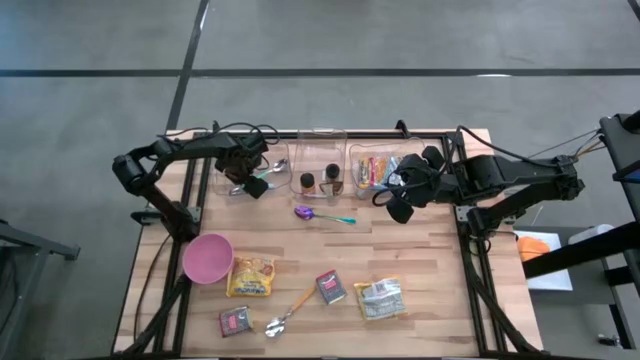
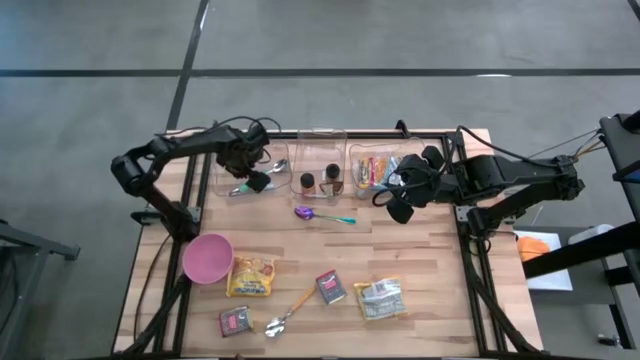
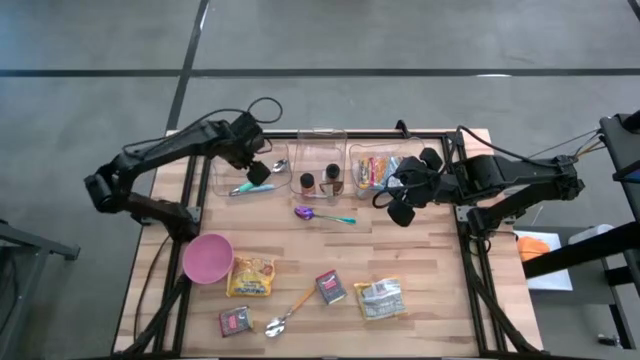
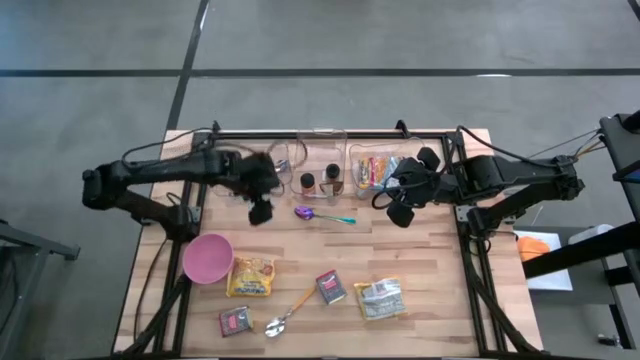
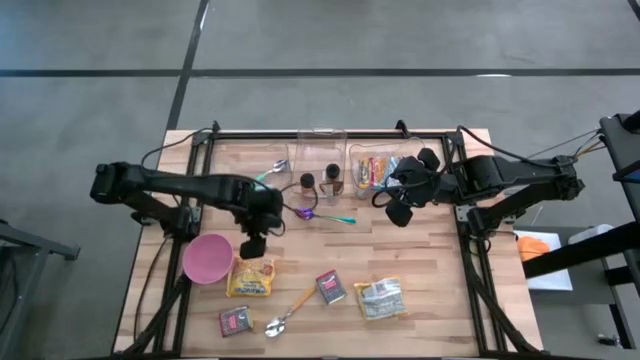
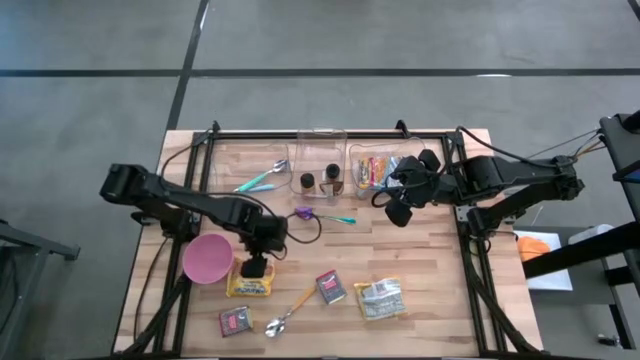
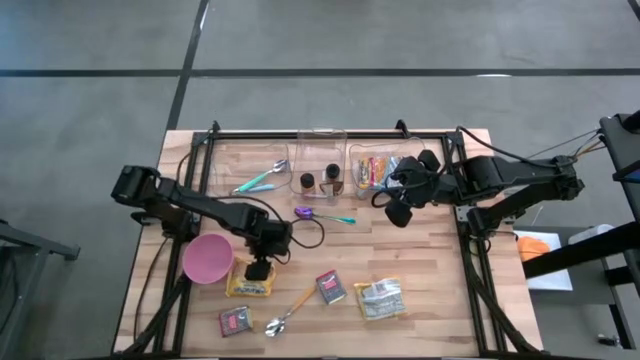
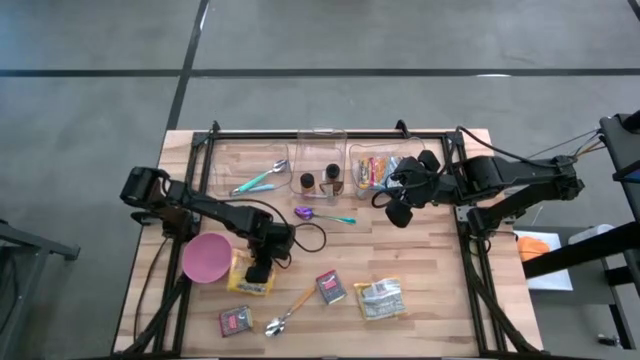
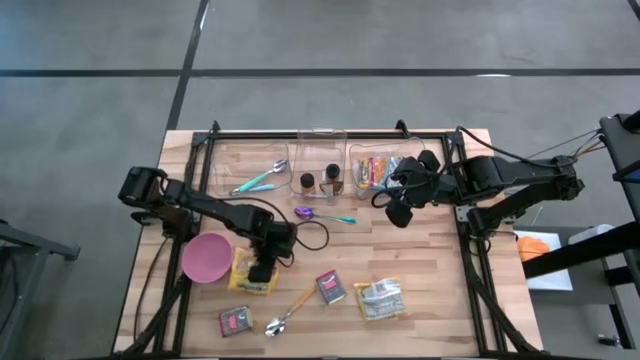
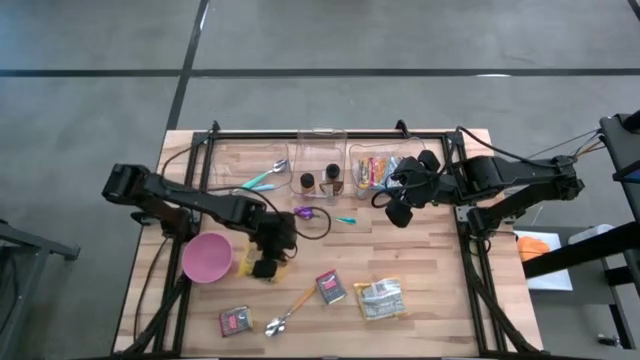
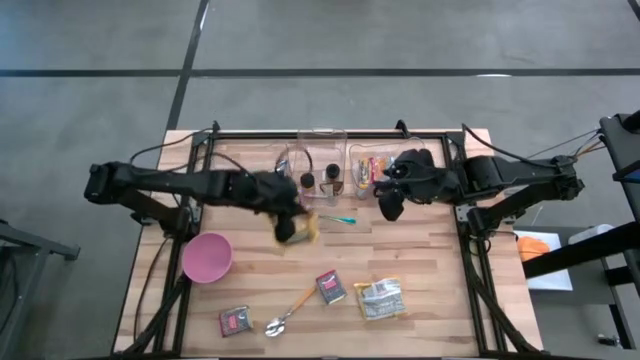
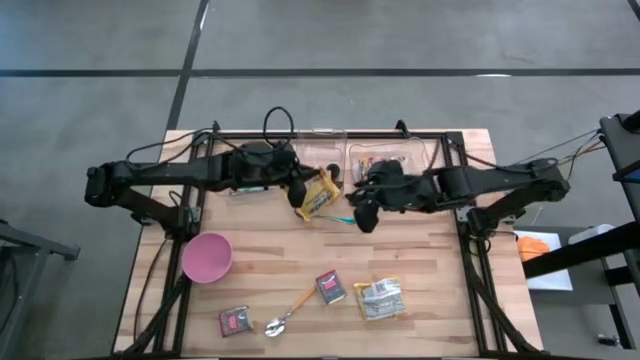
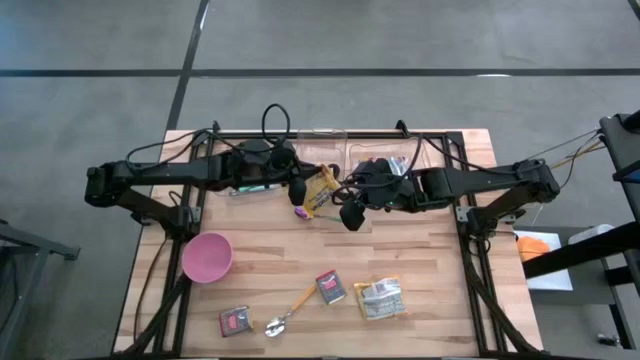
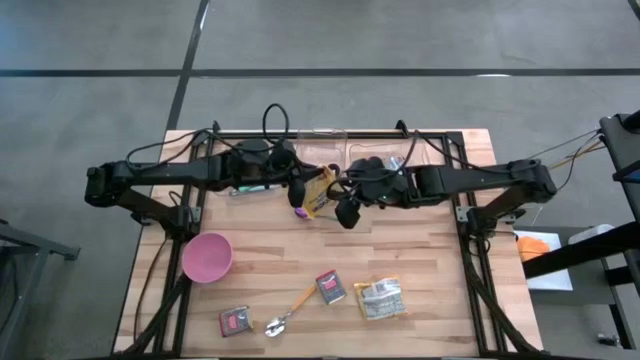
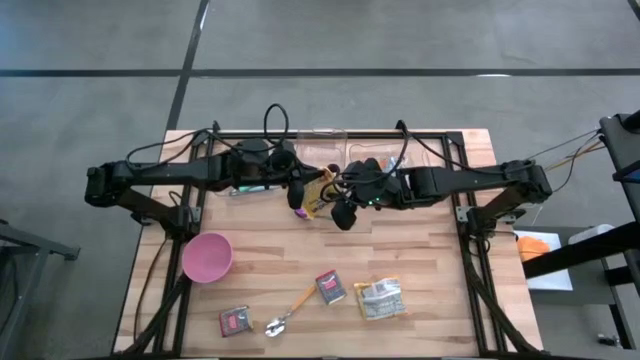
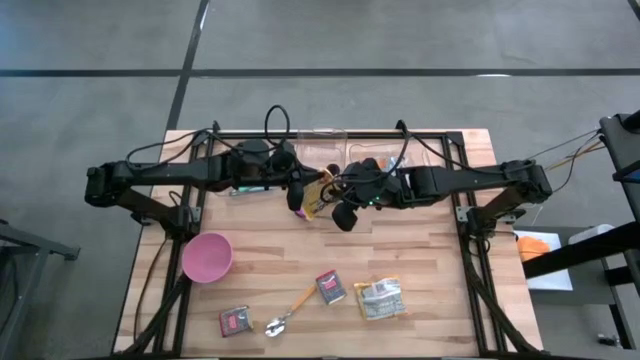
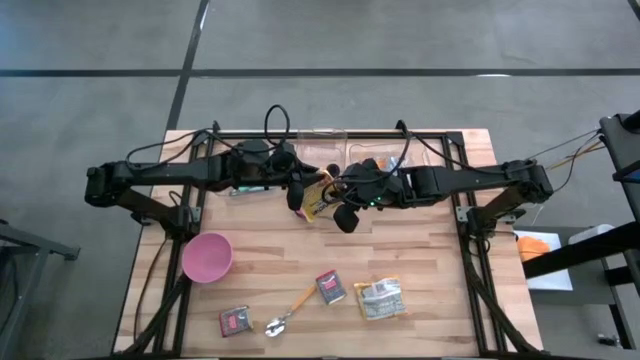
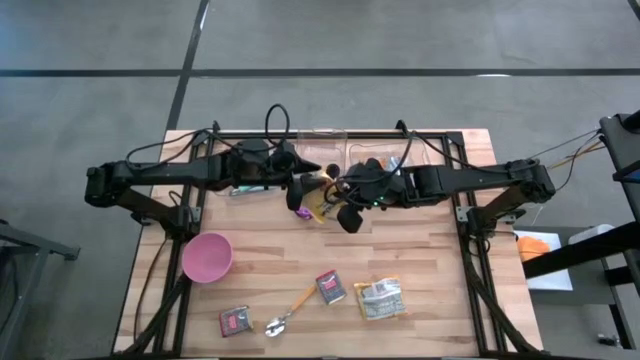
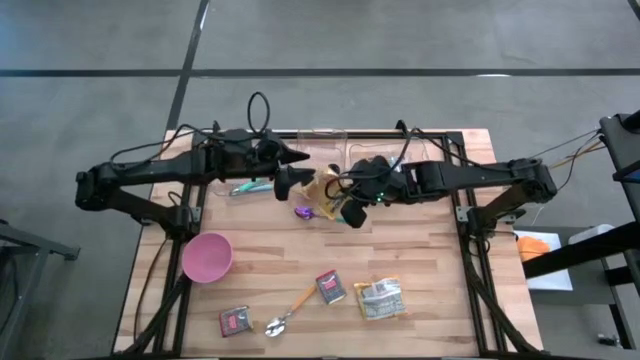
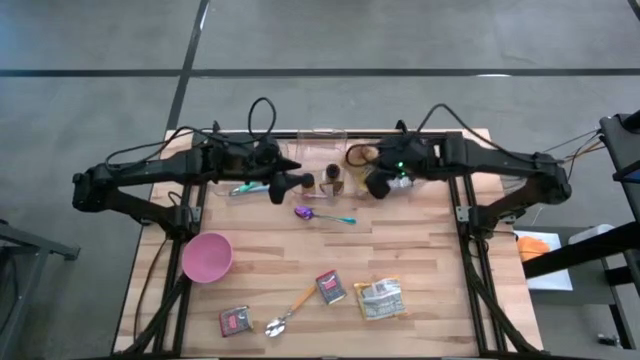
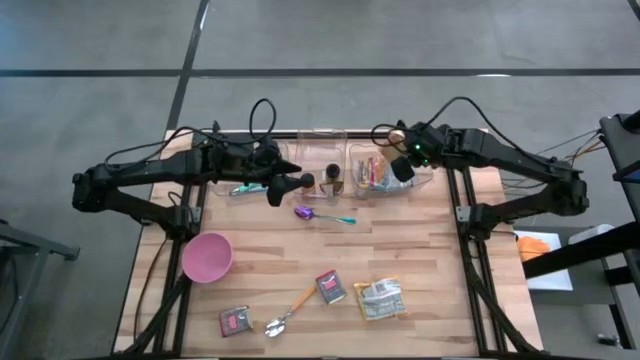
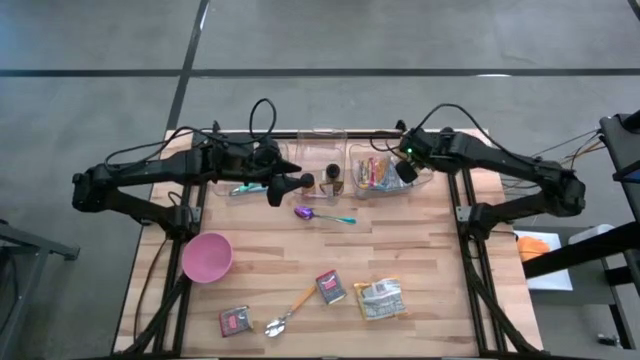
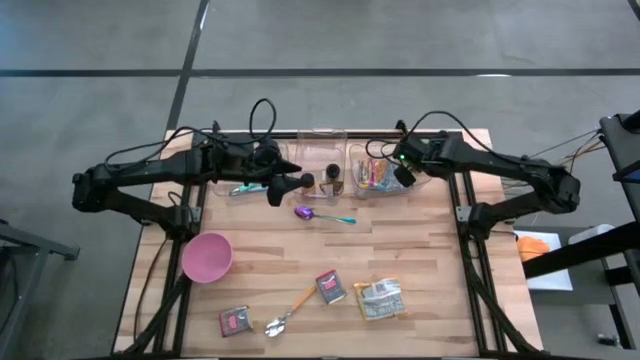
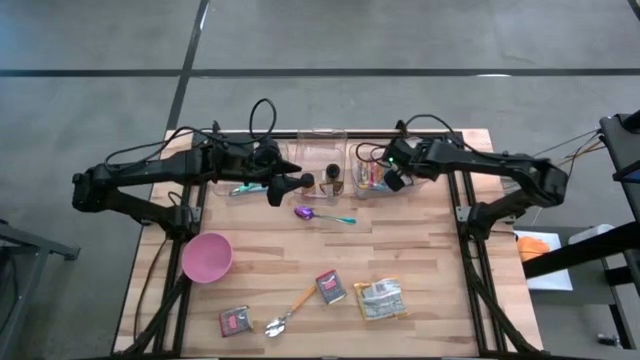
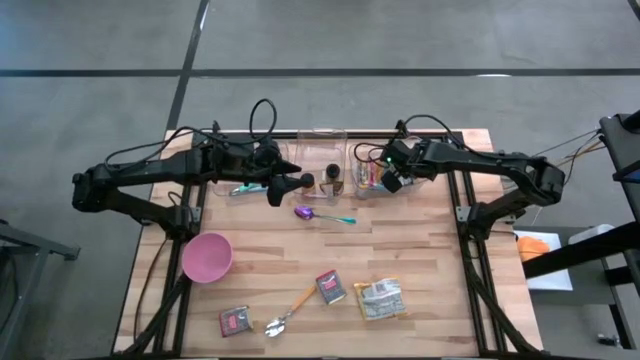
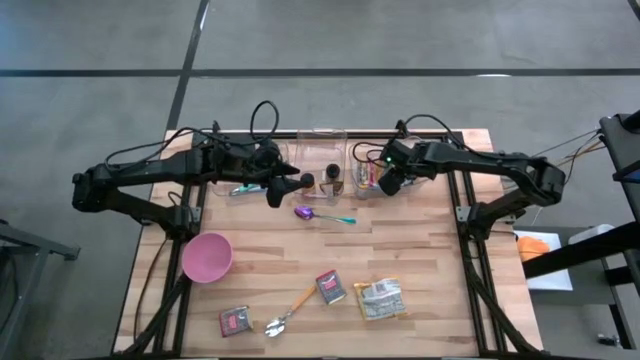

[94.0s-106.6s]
Put the left yellow noodle pack into the right transparent bin

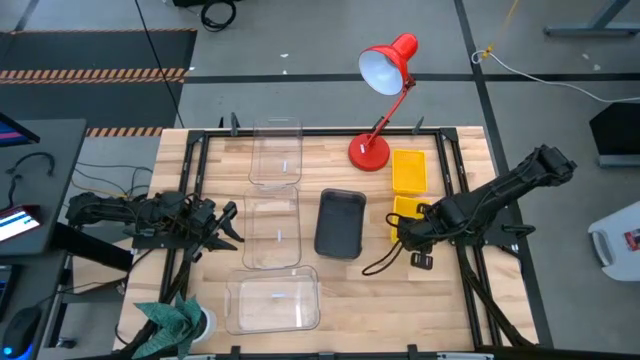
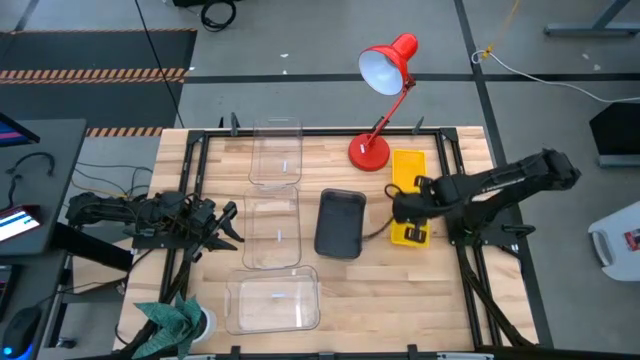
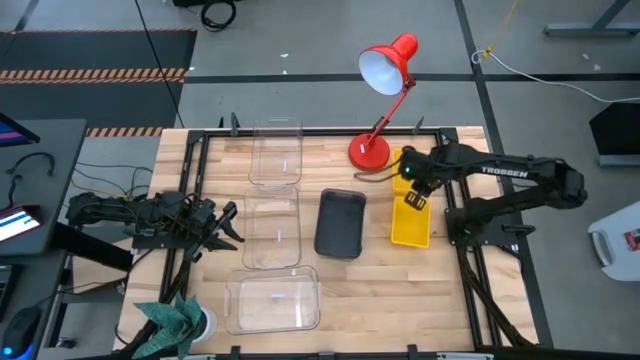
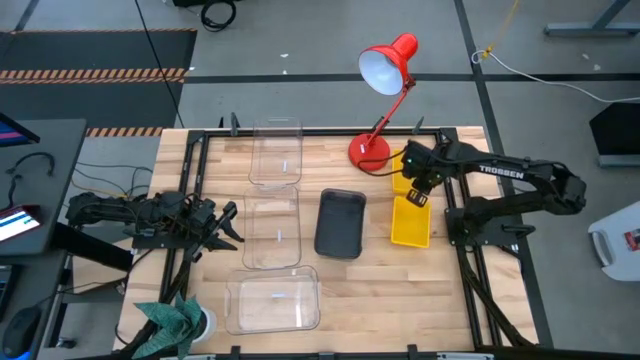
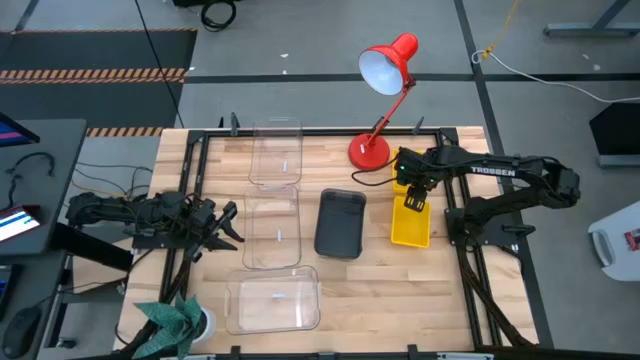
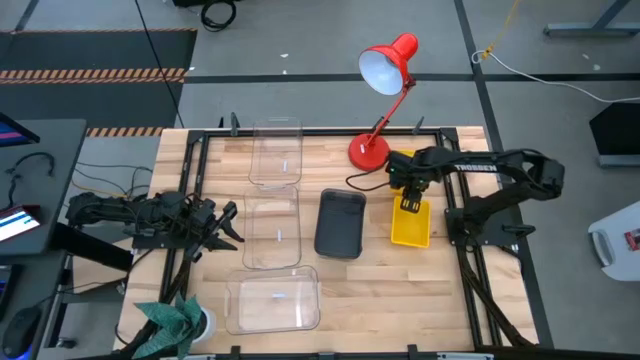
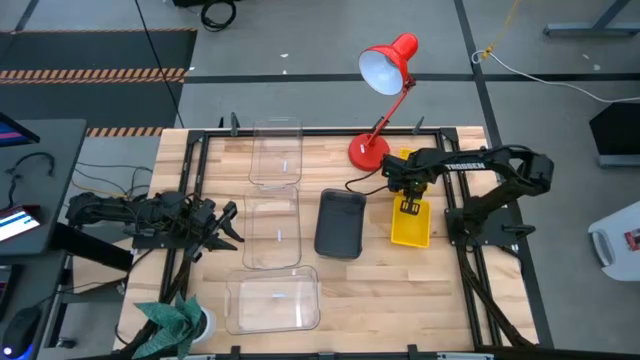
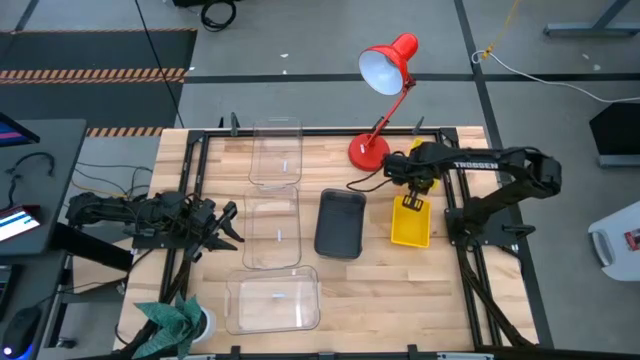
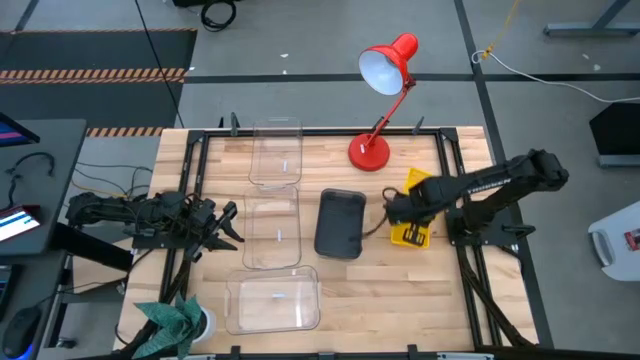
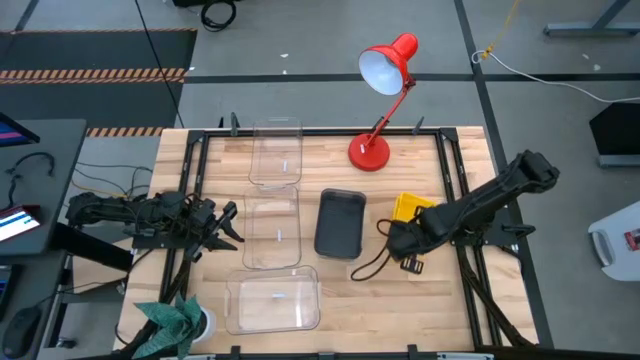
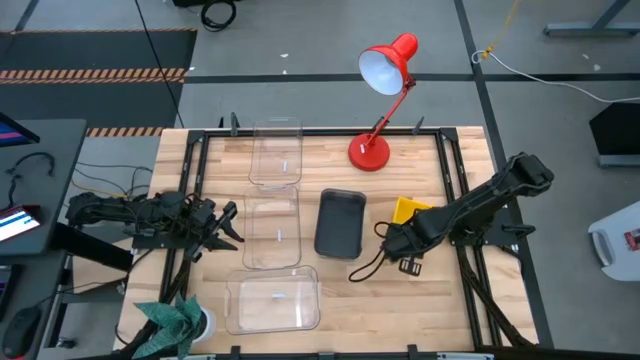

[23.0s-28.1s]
Stack the top yellow bin on the bottom yellow bins
